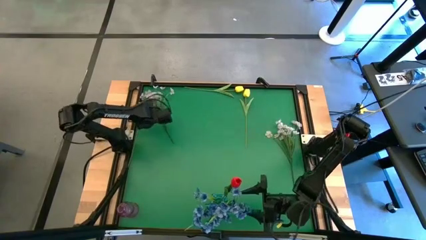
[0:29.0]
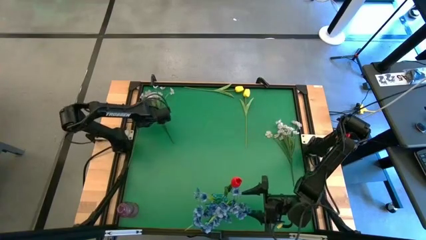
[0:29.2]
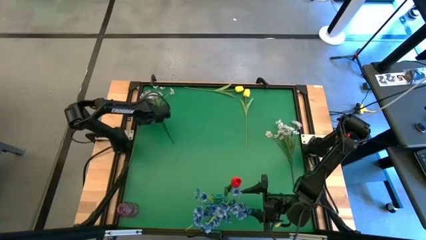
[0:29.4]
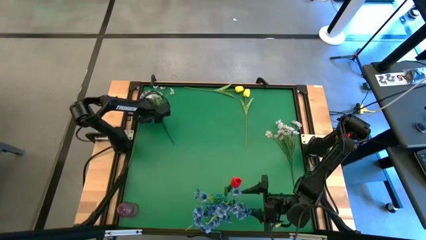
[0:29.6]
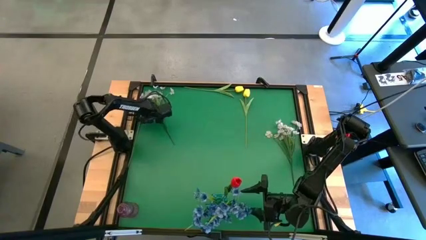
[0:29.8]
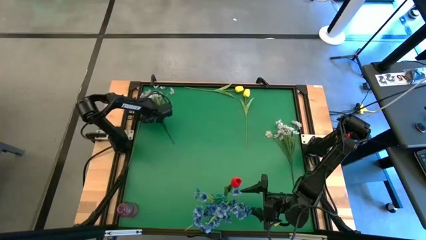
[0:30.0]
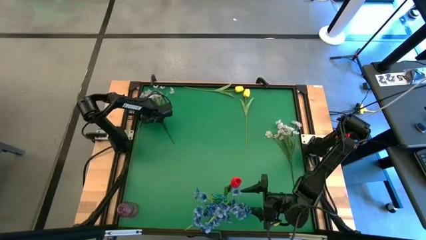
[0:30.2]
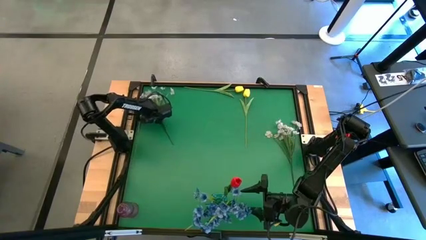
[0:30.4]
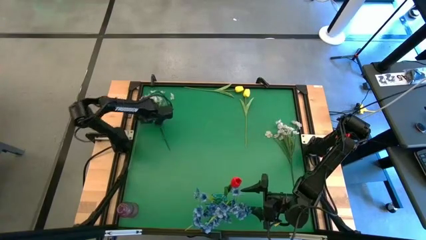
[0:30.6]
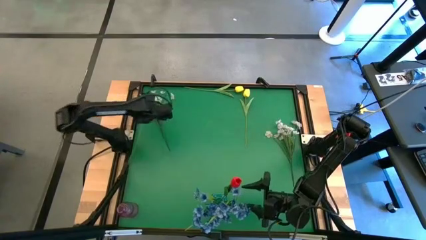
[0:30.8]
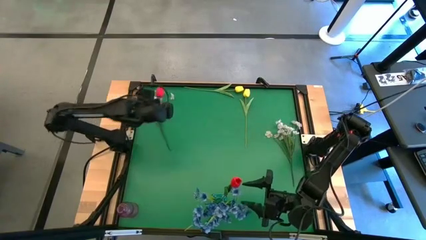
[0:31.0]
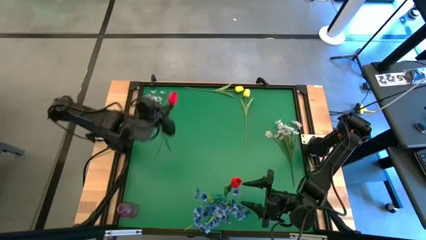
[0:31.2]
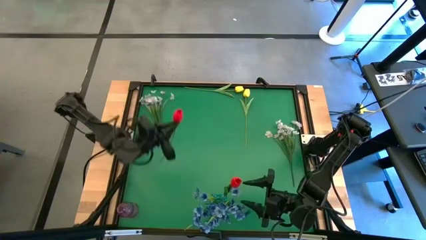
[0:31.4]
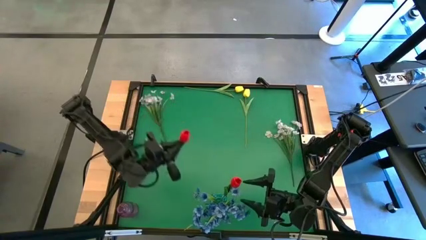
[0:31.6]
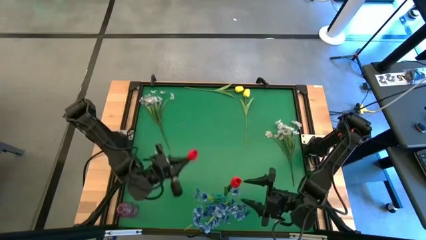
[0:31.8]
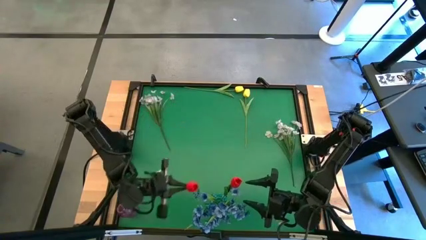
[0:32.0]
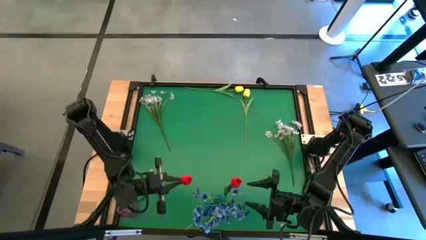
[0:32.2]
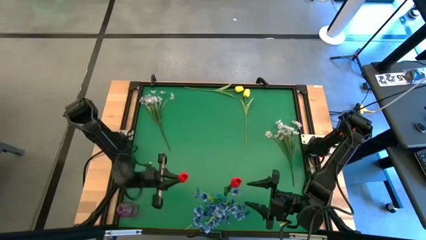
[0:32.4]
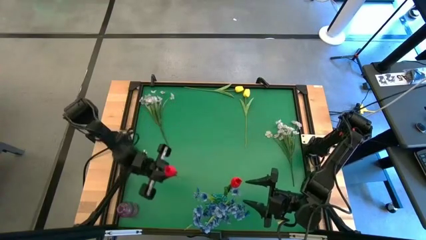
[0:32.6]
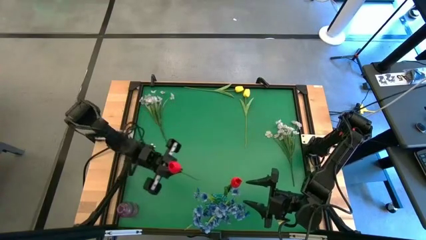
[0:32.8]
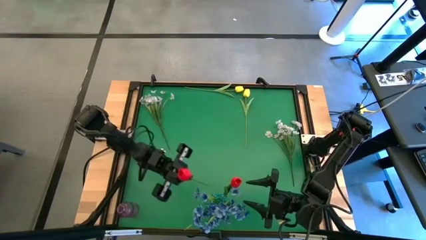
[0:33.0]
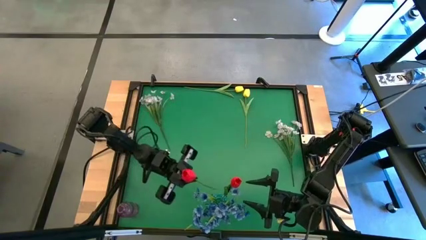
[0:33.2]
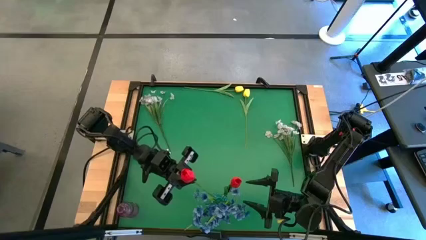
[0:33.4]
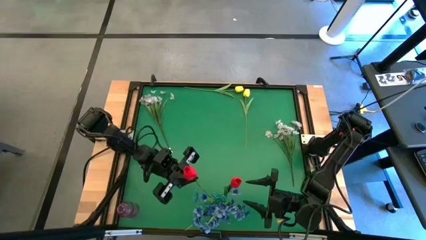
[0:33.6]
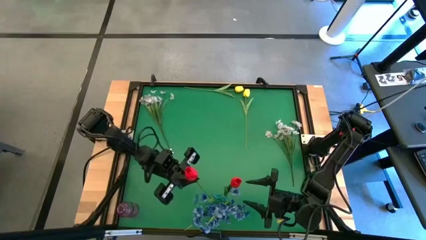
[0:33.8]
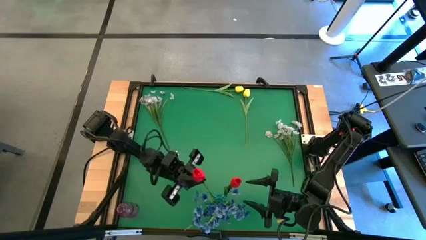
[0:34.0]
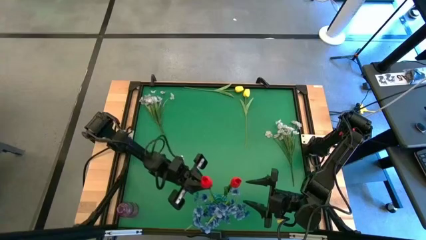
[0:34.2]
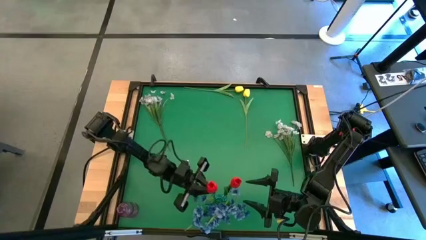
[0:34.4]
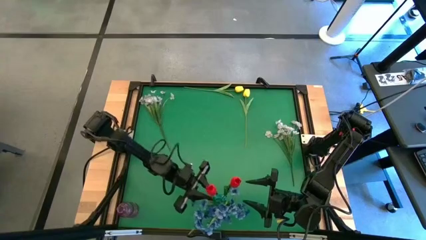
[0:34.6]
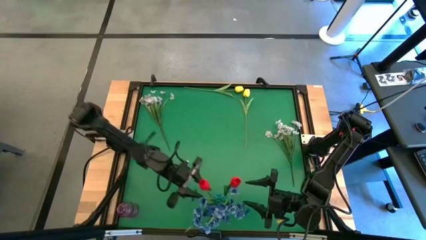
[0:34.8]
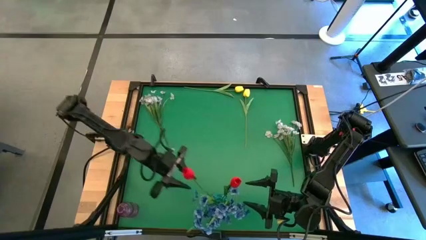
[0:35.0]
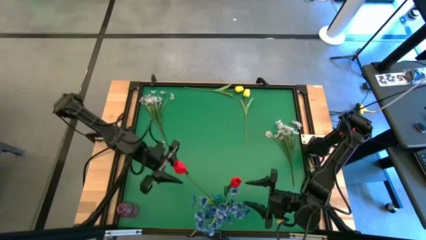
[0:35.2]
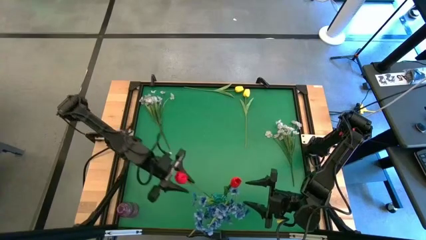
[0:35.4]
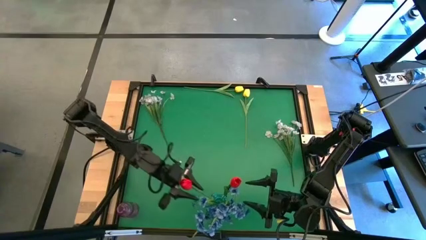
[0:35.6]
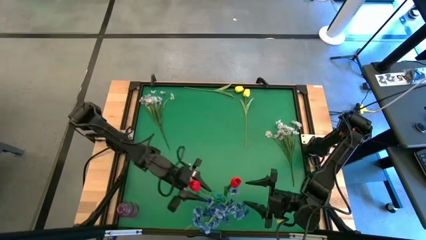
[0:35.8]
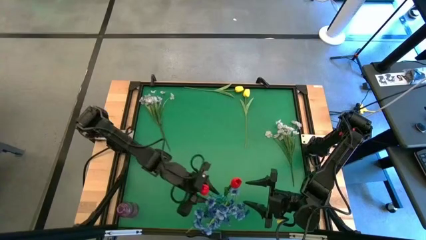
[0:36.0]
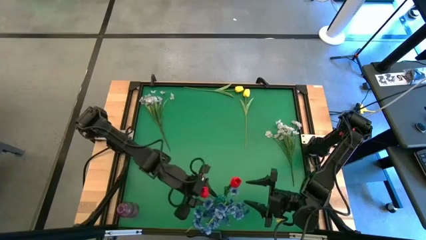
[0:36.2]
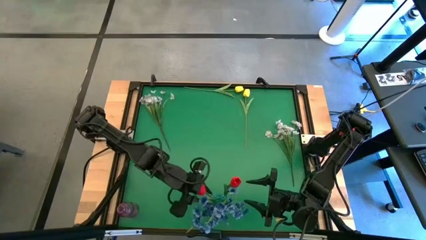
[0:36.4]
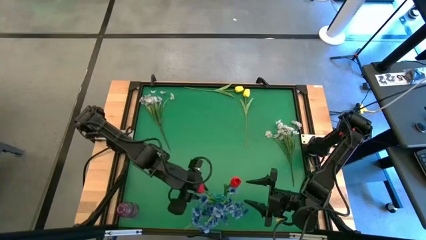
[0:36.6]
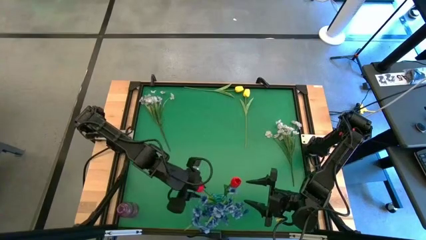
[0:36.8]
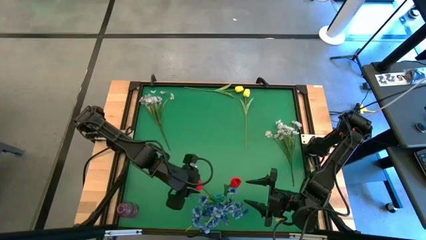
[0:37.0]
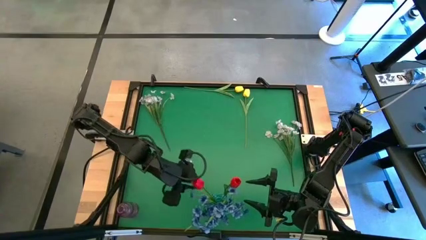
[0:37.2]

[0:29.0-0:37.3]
Task: Sort flowers into vase by color
Put the red flower into the blue vase

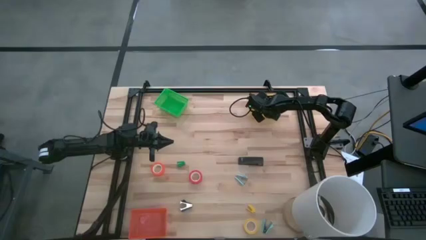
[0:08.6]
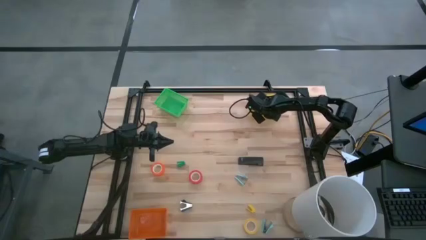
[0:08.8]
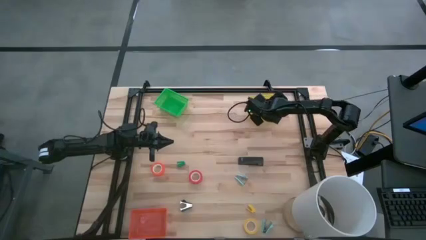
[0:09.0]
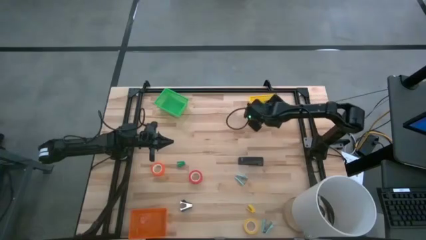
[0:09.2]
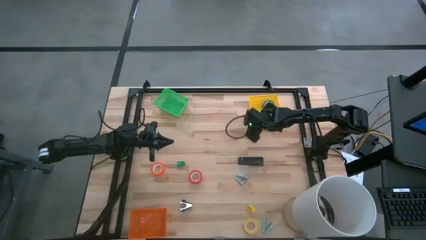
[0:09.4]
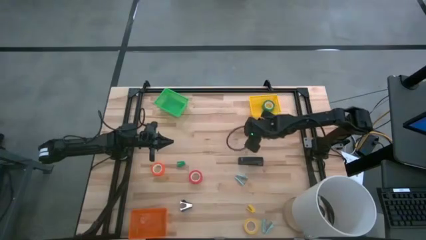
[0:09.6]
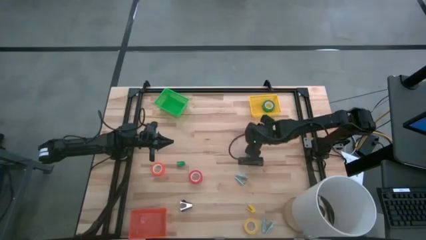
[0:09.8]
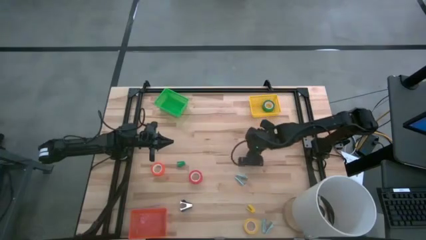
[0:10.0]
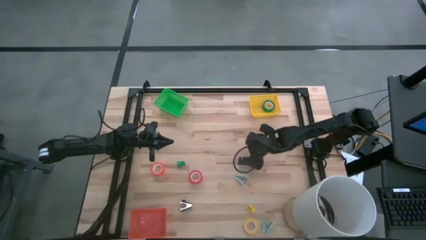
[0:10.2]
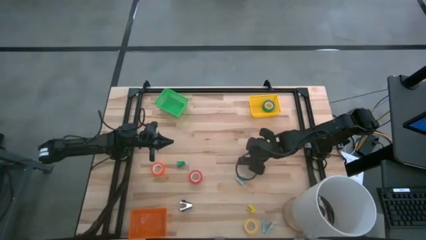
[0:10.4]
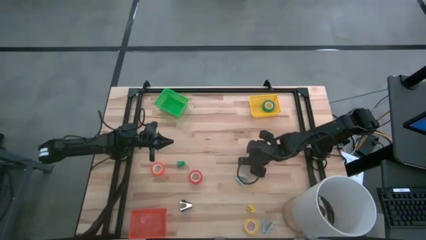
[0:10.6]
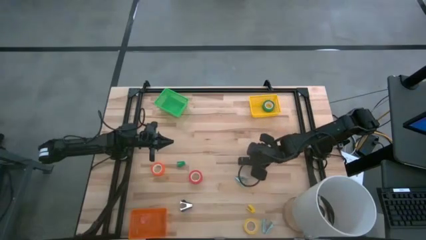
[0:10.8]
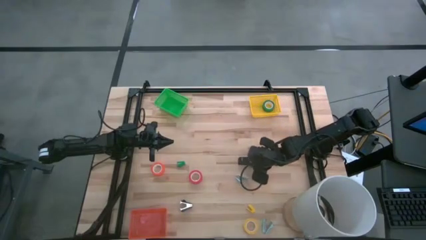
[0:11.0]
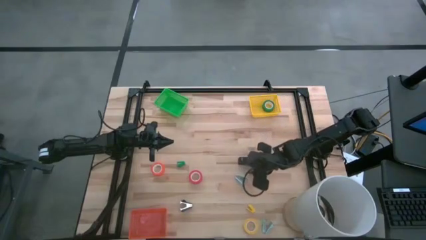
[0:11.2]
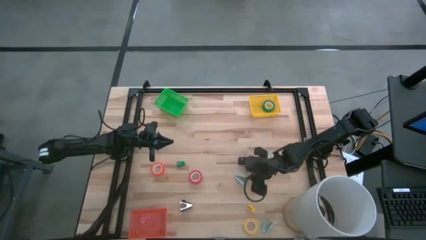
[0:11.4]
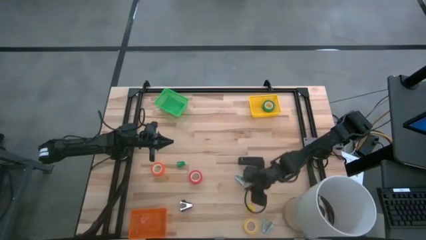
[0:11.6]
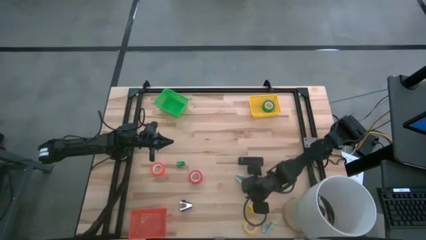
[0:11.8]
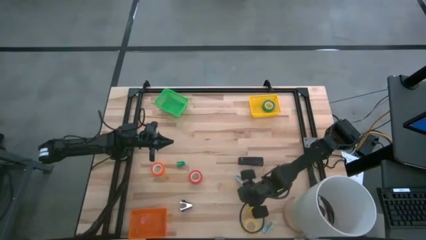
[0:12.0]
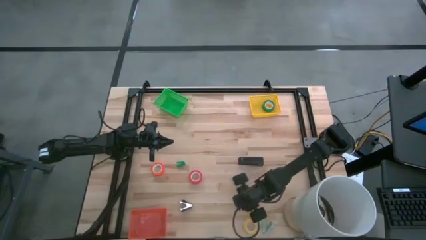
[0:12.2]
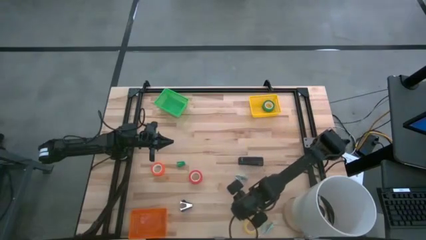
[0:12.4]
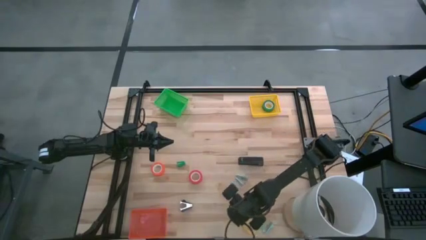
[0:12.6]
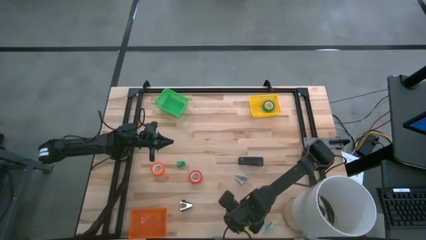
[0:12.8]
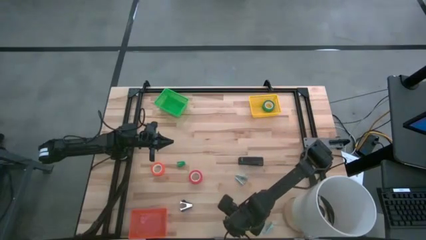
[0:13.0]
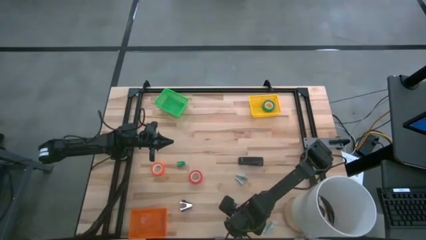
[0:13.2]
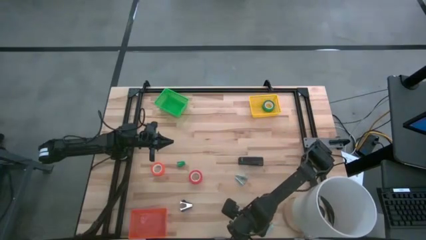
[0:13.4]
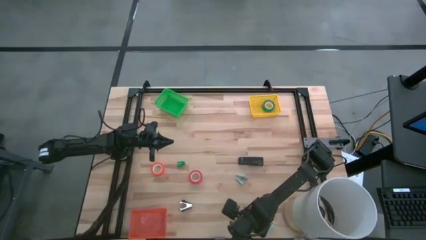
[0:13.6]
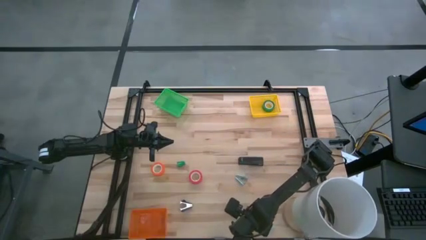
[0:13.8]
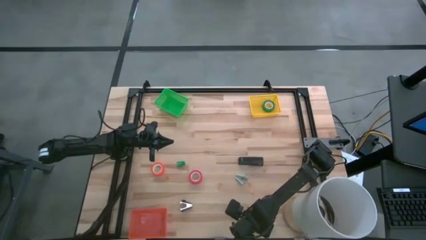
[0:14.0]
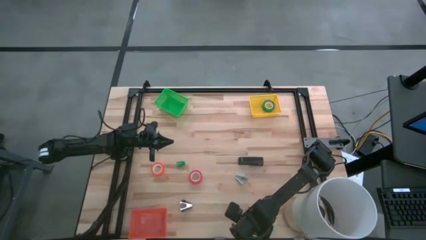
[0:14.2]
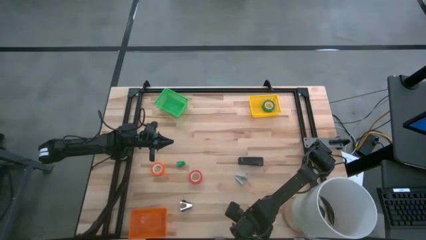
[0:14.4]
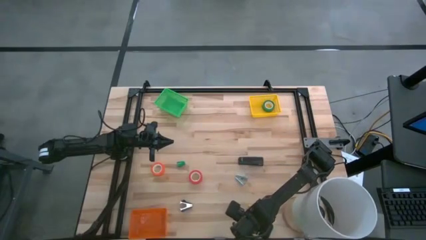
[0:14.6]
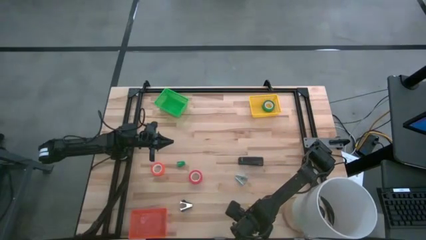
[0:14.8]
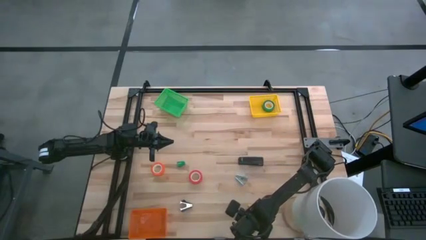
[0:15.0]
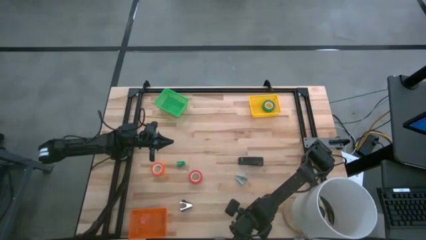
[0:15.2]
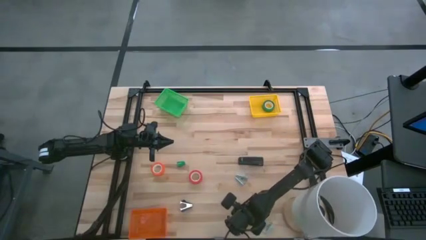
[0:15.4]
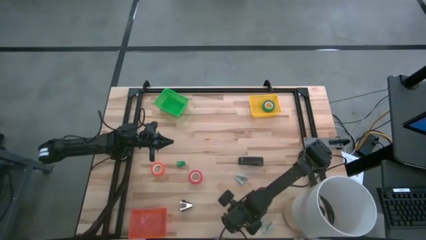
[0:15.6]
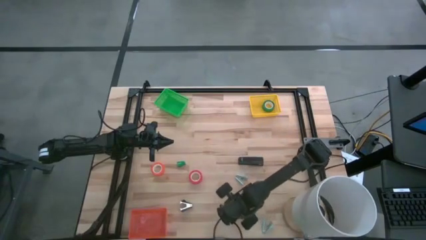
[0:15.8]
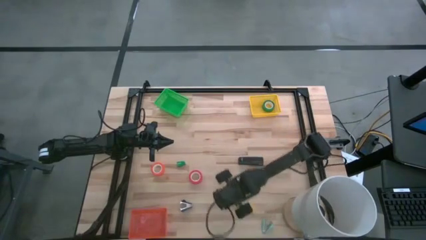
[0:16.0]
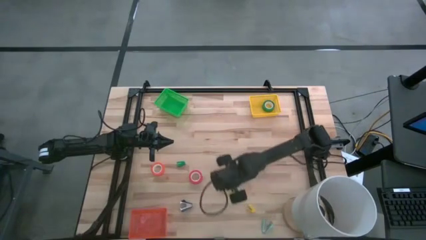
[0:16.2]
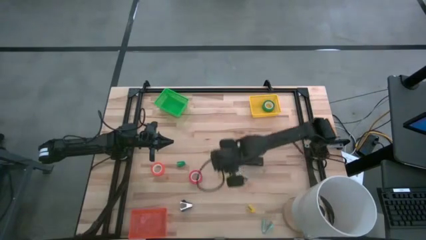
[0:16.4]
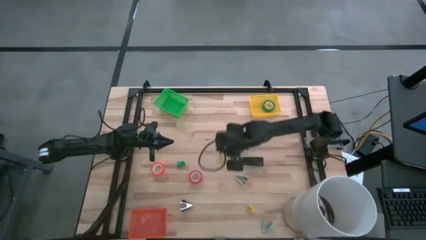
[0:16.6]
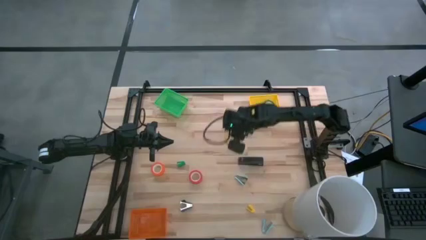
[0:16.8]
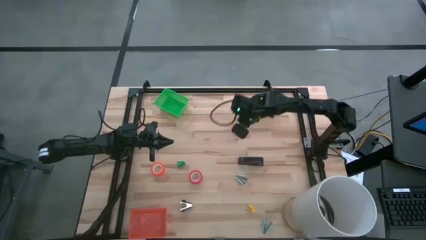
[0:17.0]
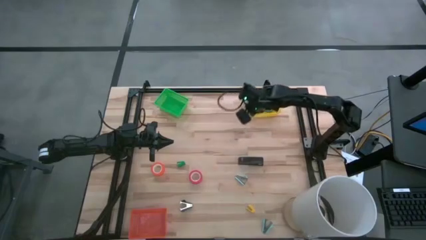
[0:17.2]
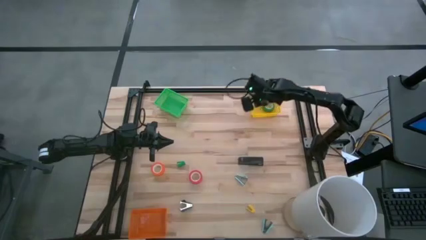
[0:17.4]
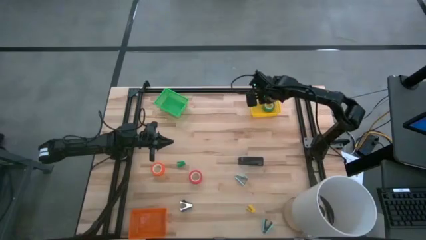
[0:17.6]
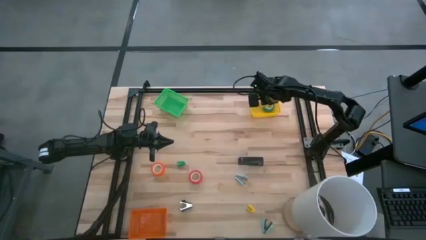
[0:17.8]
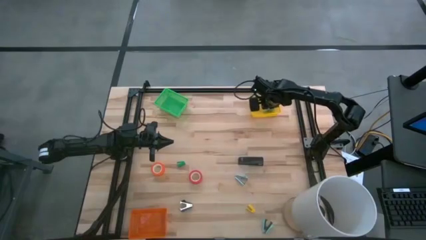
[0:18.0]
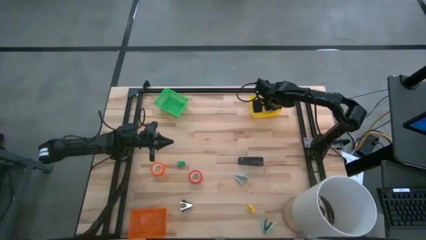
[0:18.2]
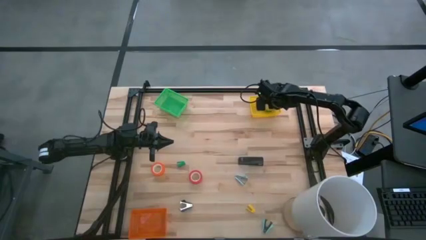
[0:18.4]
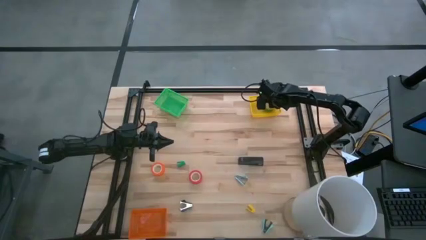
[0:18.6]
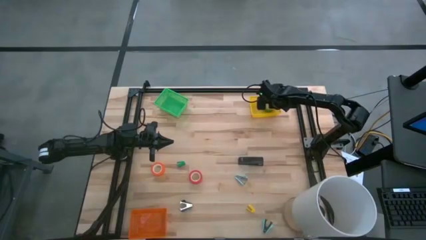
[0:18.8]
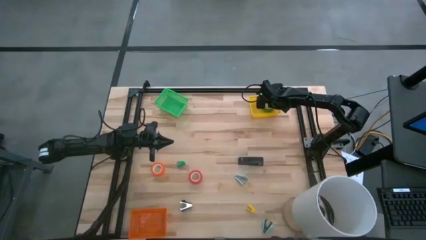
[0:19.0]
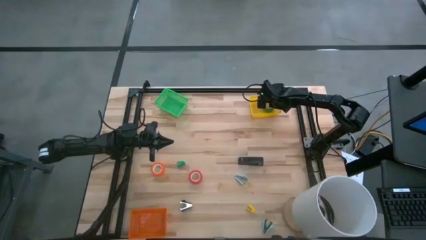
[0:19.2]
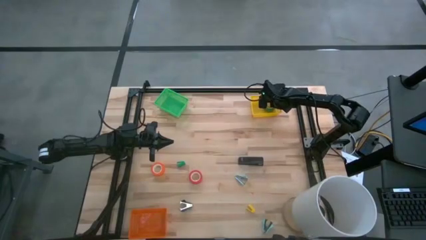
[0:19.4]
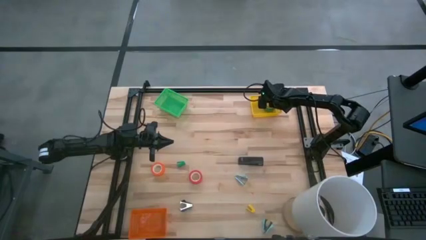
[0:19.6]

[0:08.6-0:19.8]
Task: Pick and place Stapler, Stapler remover, tape
Put the yellow tape into the yellow bin
